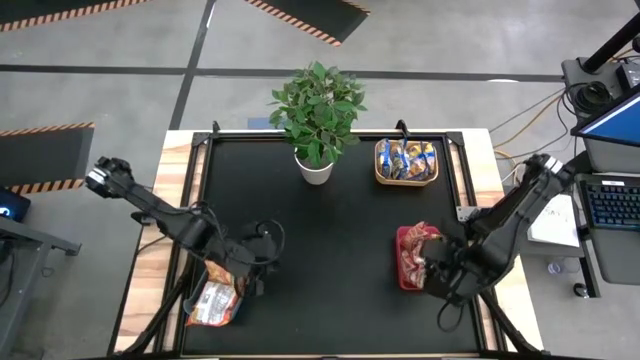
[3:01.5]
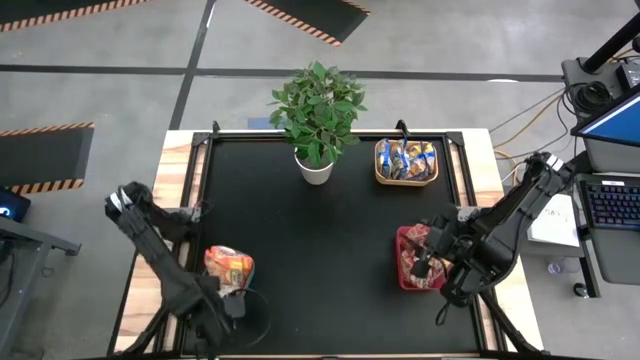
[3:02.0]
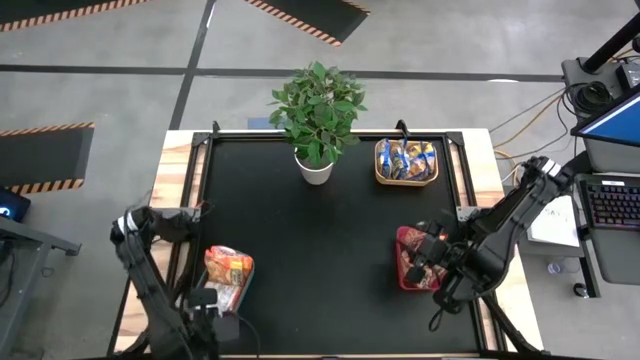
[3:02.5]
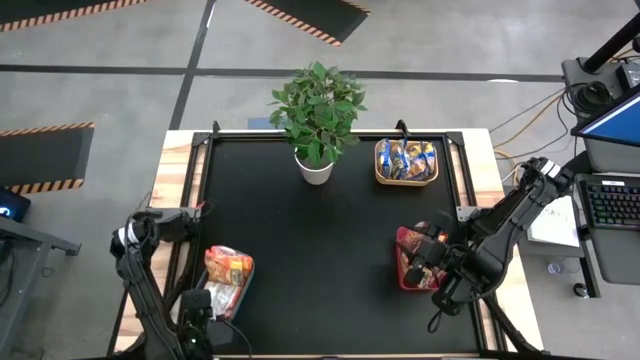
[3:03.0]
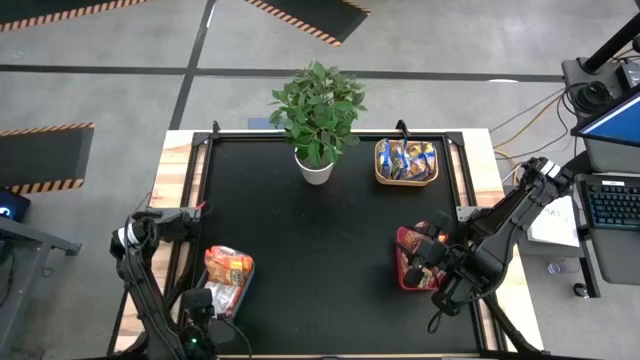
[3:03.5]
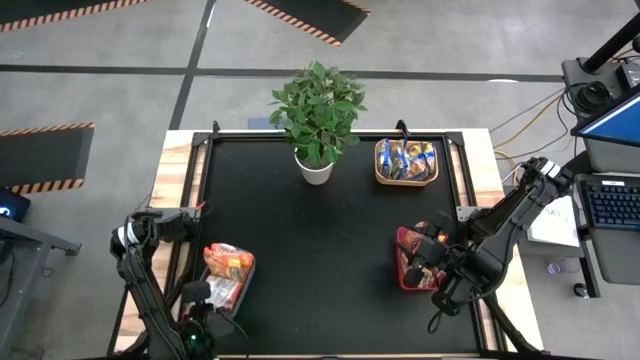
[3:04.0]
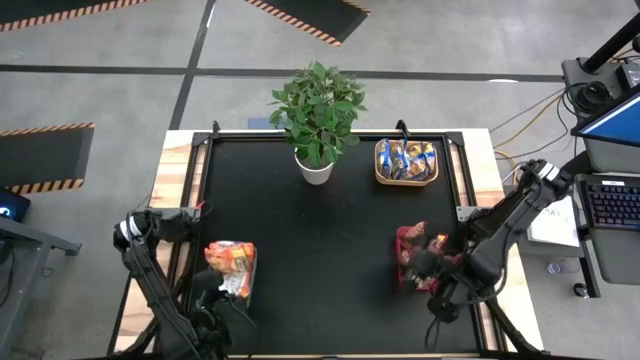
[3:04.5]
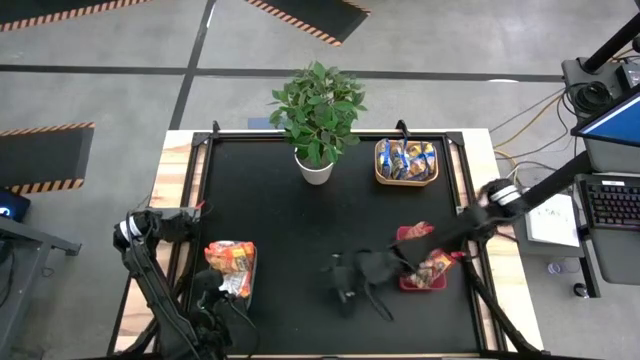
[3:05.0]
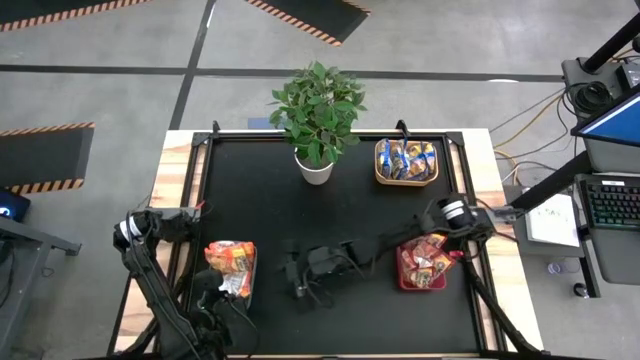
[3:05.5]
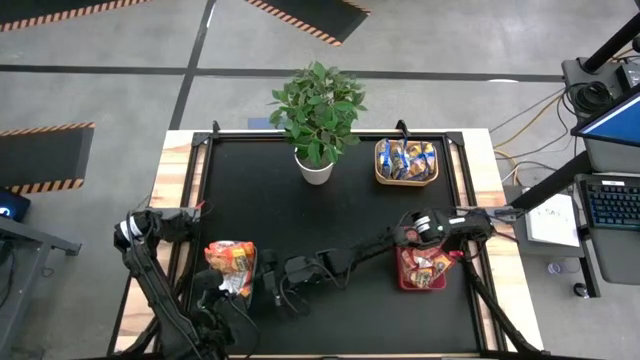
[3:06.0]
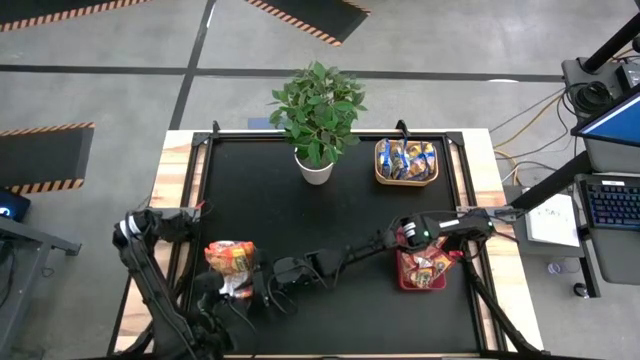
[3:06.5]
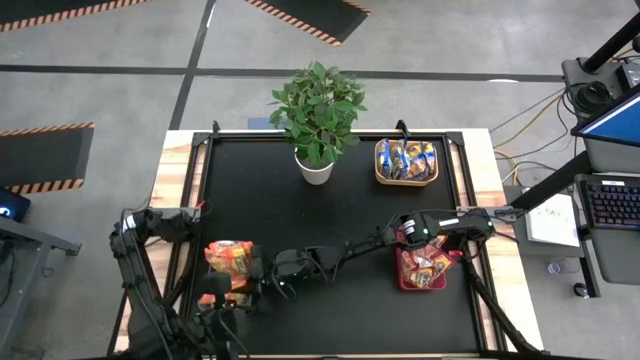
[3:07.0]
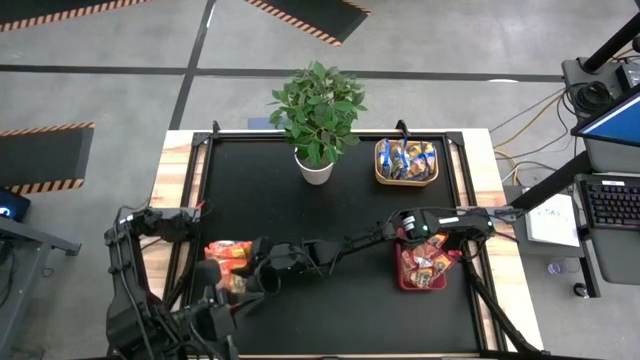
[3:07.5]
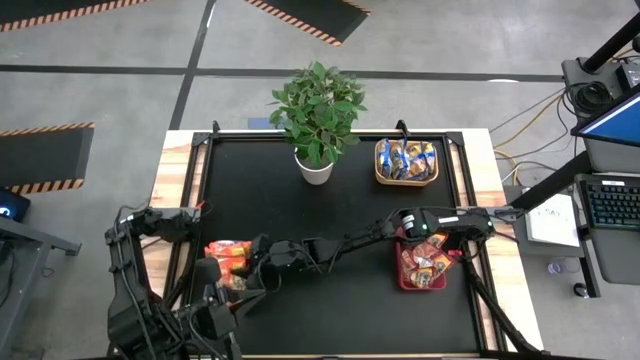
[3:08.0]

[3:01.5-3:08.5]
Task: Sort Maruchan noodles
Adjust the orange noodle pack into the blue bin

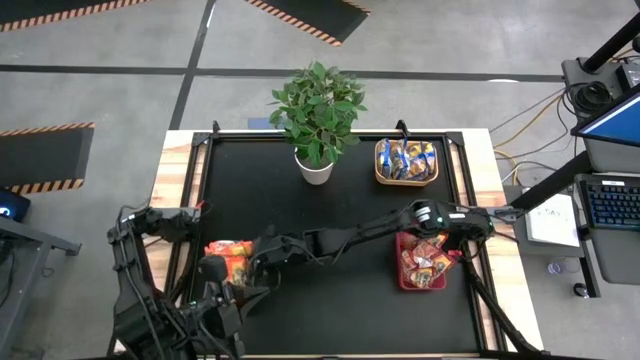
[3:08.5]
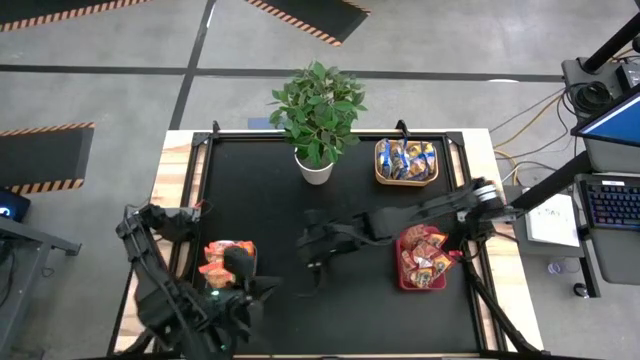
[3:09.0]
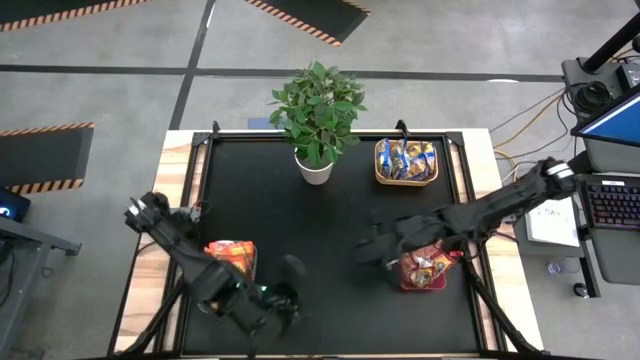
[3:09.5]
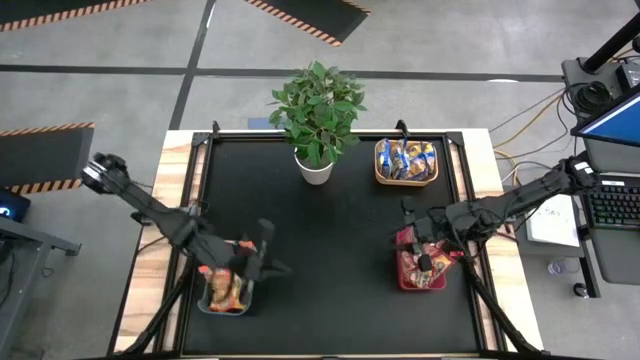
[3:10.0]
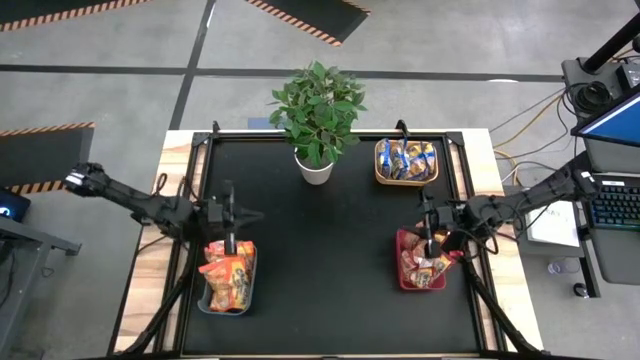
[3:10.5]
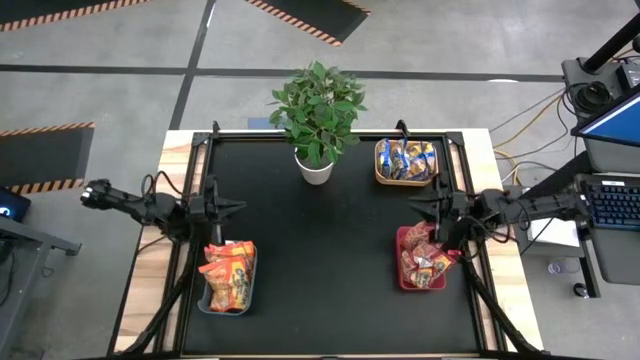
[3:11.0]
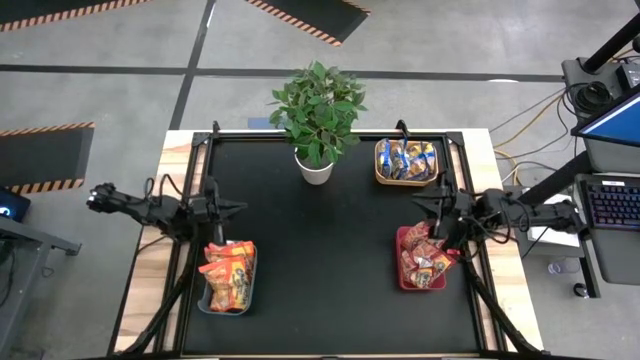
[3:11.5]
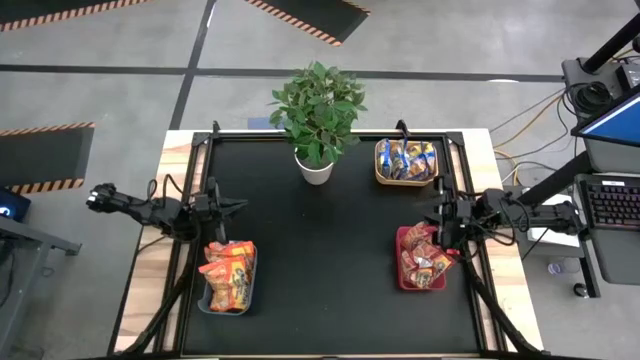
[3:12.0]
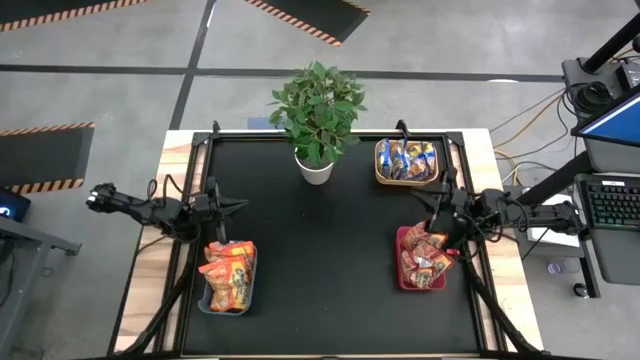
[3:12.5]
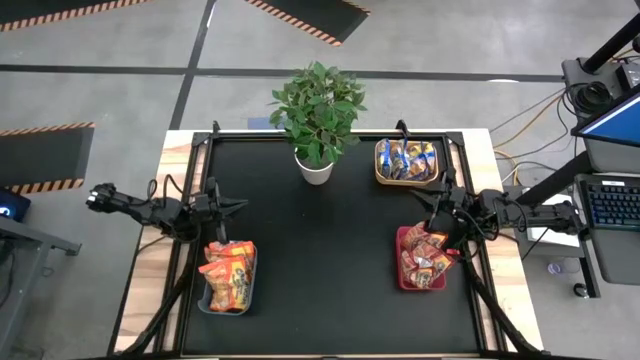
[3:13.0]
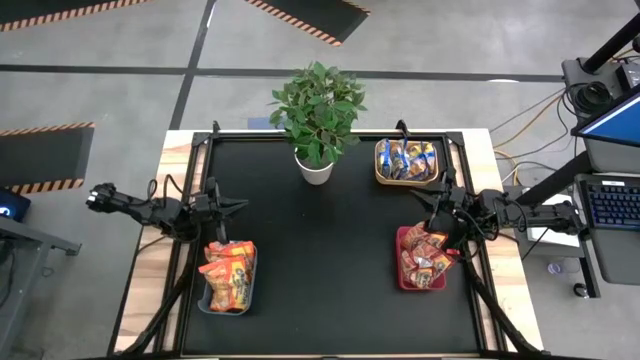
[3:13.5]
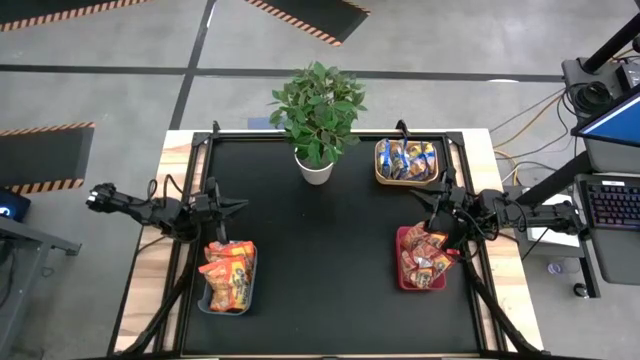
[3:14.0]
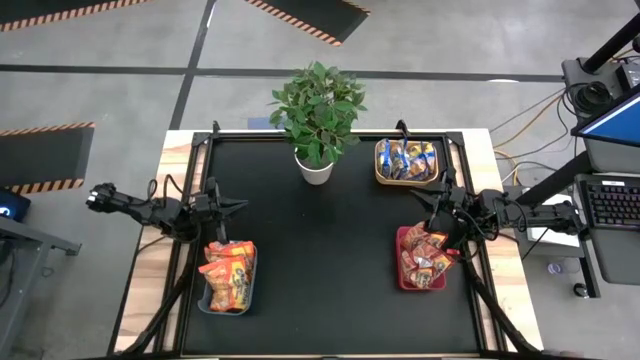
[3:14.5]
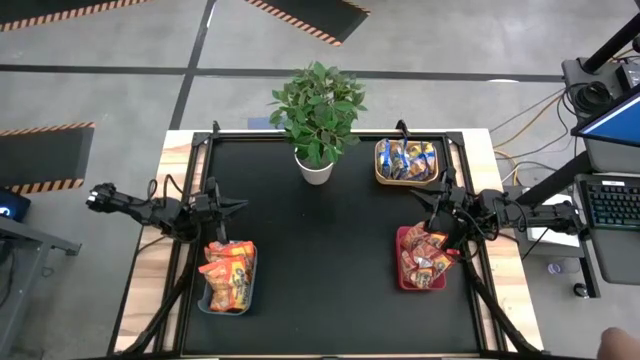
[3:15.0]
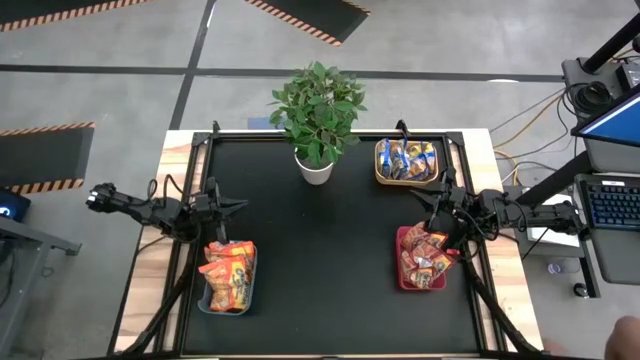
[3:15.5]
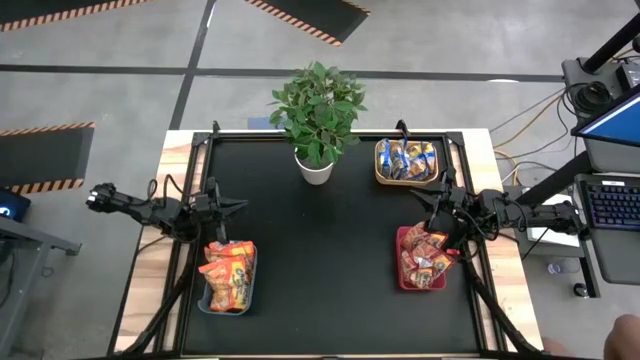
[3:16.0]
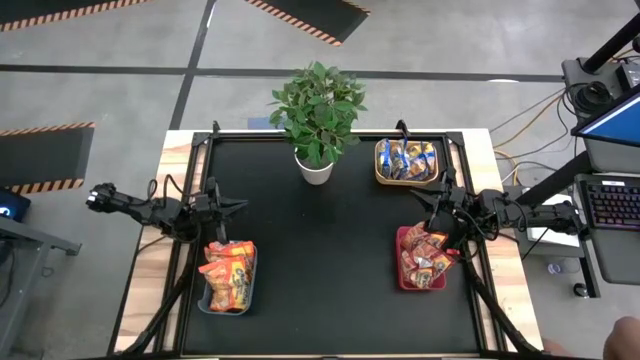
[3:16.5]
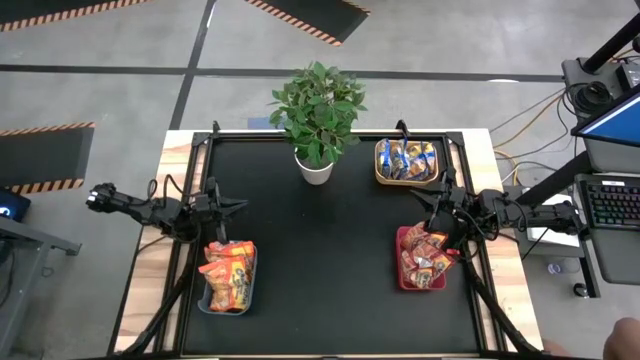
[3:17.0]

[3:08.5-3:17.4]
Return to Home Position

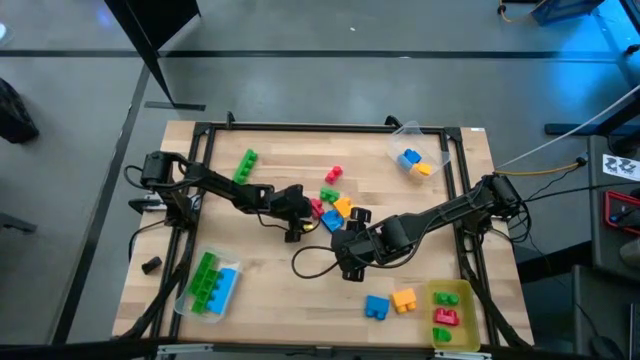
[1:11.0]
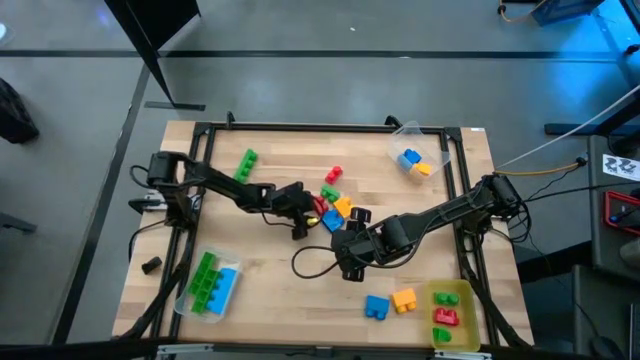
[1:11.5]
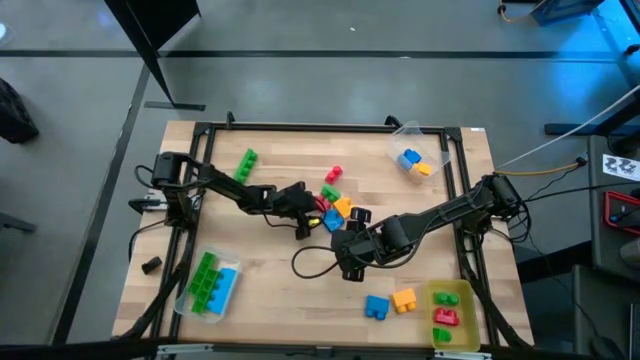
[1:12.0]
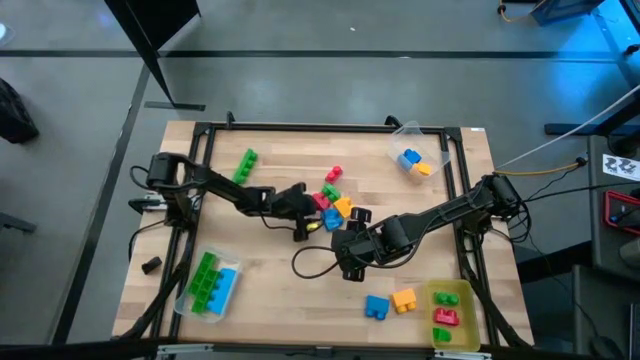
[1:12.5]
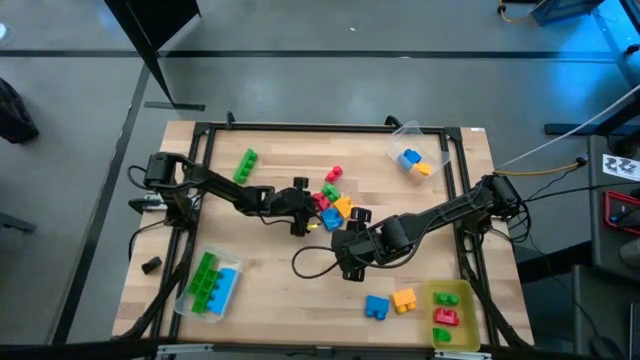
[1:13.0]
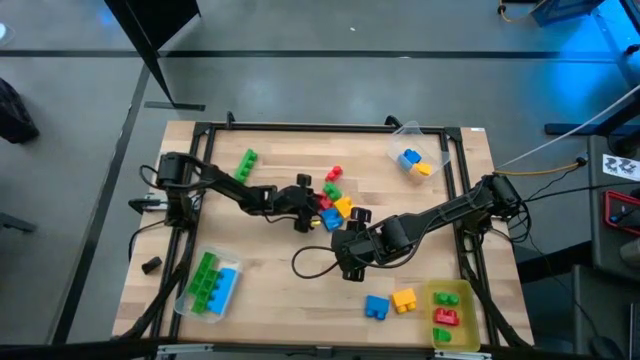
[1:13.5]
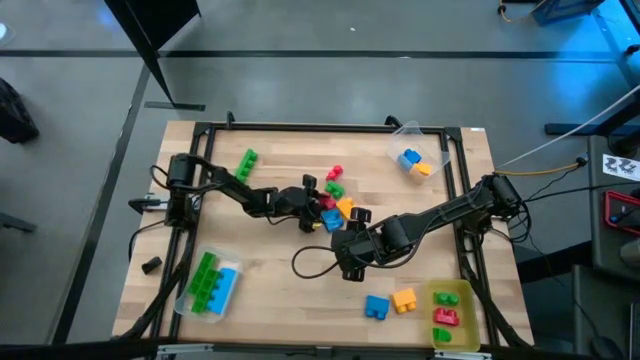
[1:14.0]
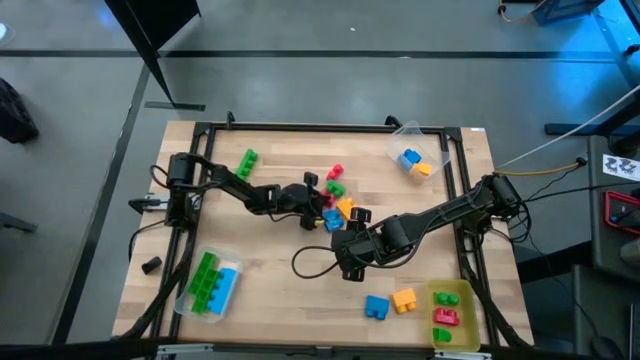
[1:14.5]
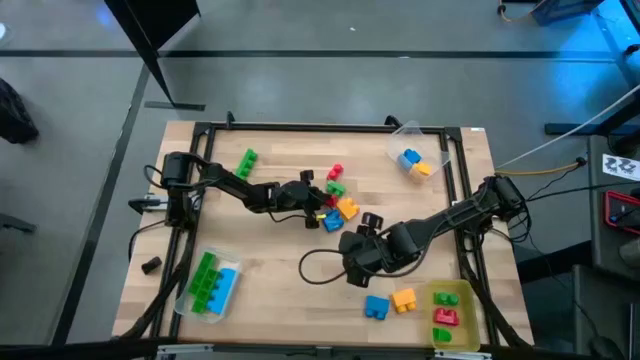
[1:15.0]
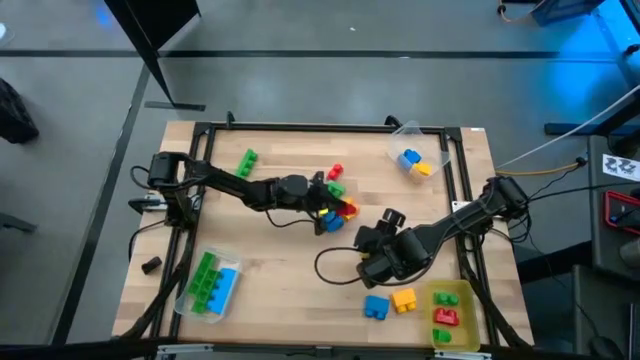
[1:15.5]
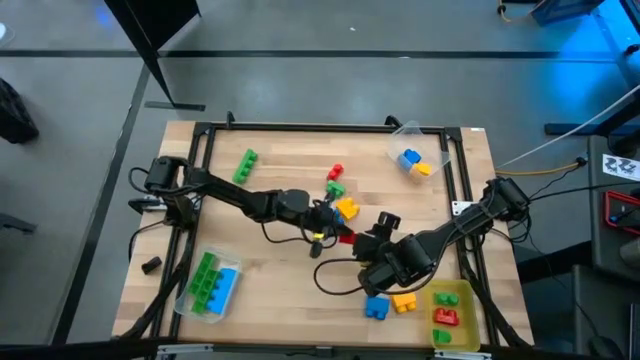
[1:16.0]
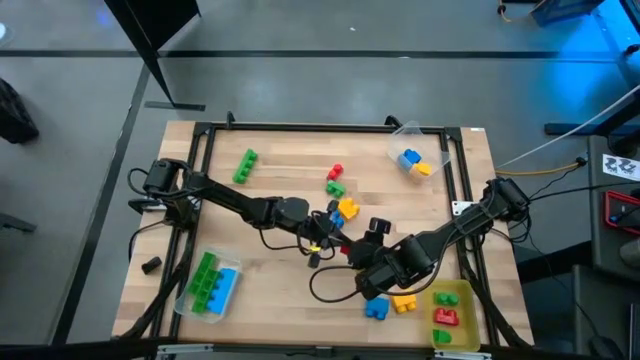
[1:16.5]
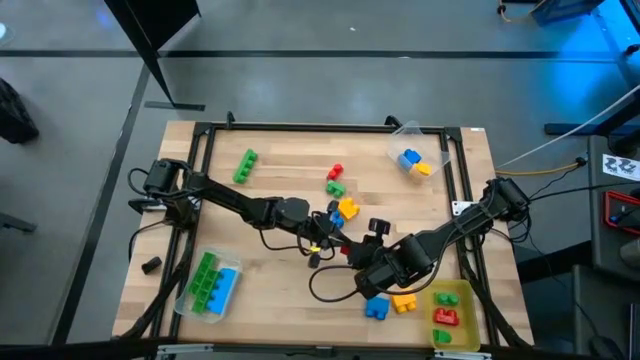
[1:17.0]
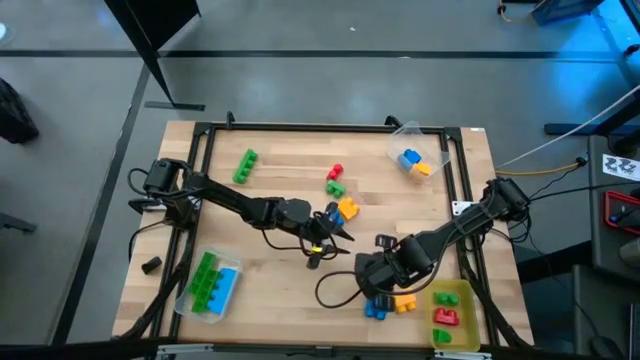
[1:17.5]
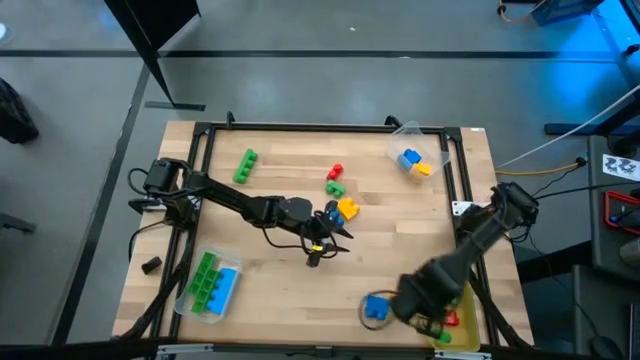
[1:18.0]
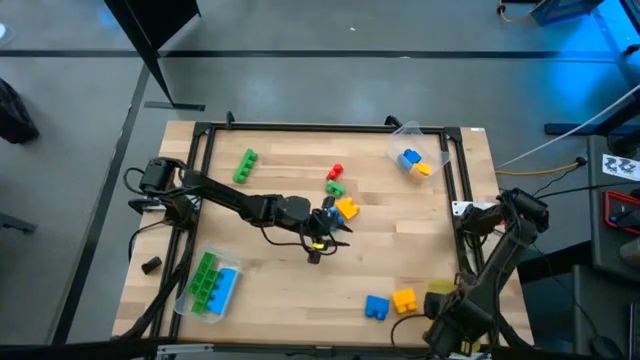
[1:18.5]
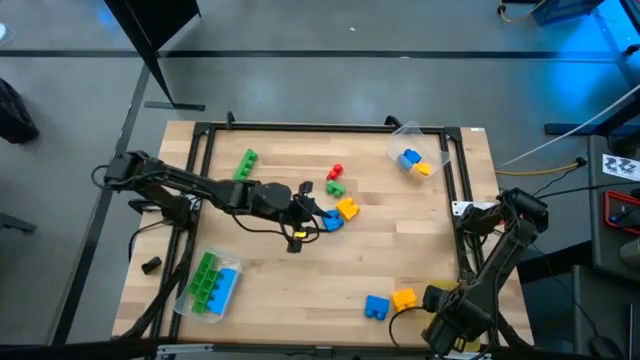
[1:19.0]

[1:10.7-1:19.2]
Task: Sort blocks by size
Put the bottom 2 stud red game piece into the yellow bin
